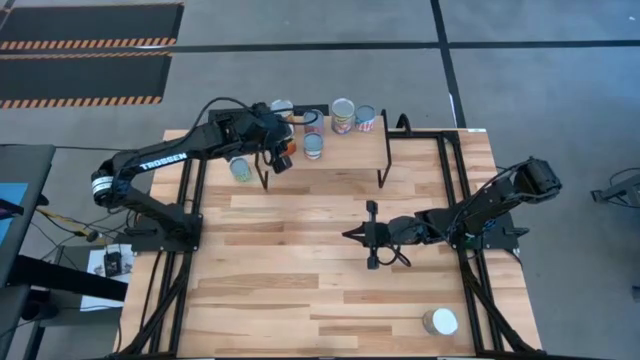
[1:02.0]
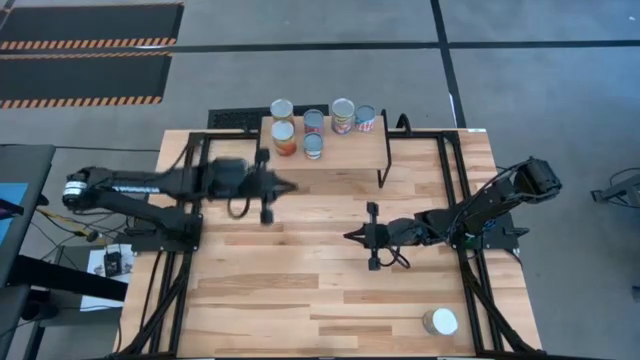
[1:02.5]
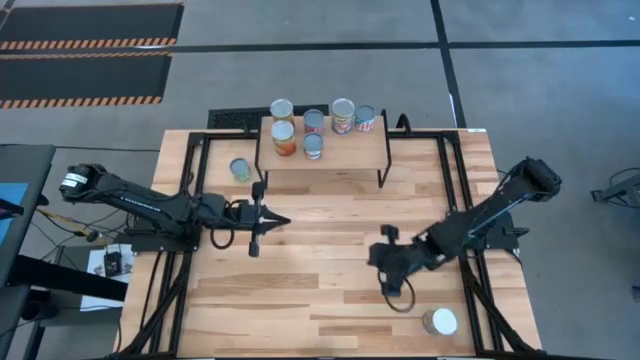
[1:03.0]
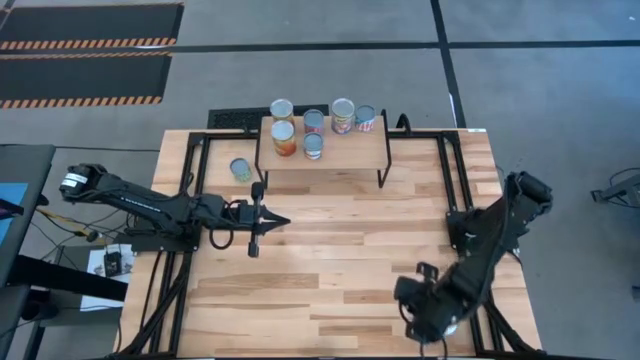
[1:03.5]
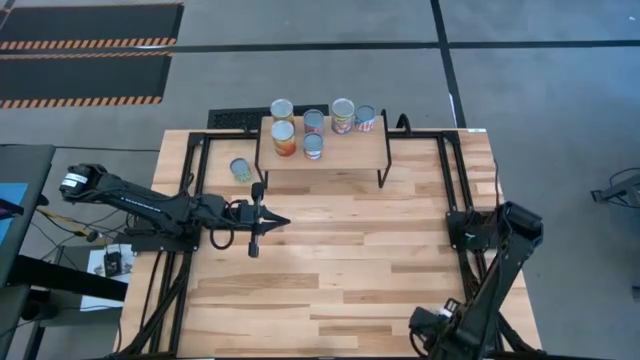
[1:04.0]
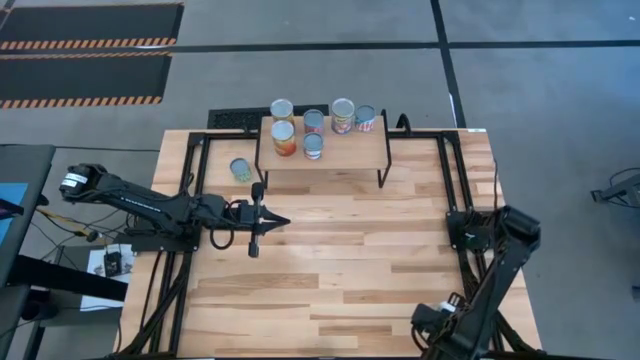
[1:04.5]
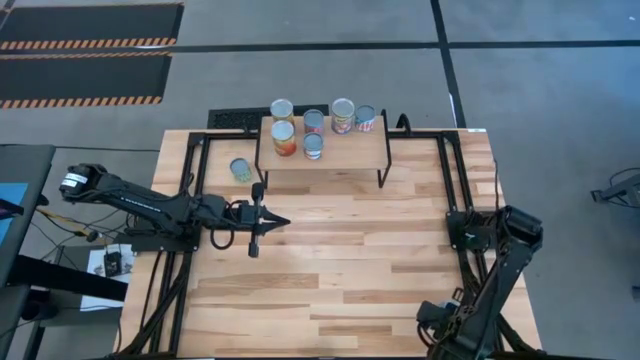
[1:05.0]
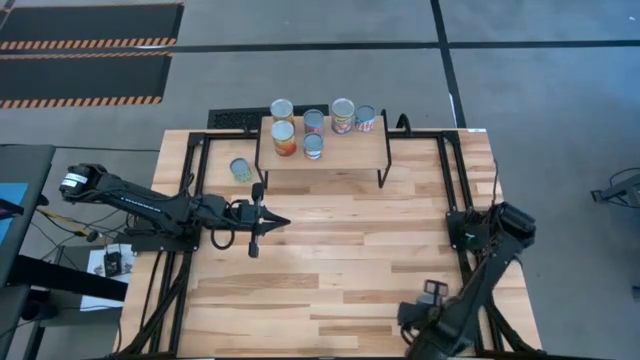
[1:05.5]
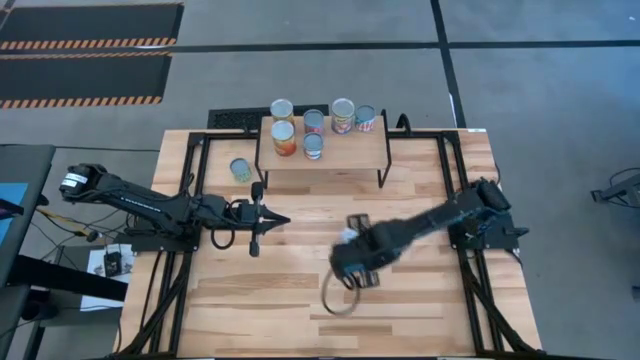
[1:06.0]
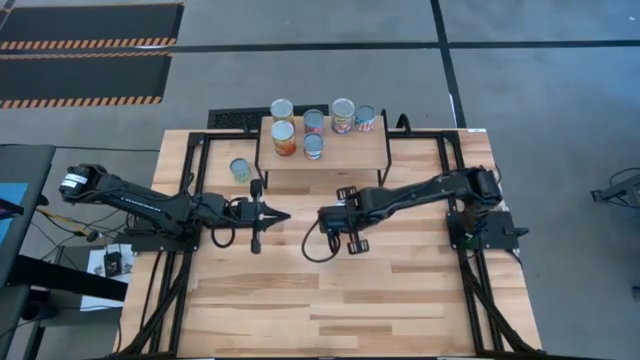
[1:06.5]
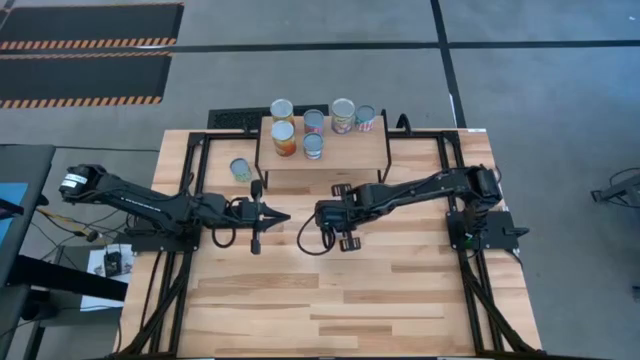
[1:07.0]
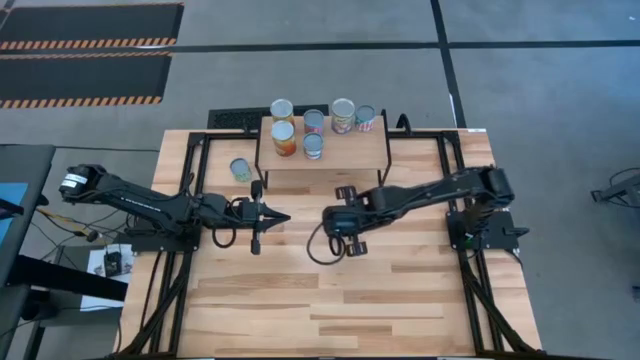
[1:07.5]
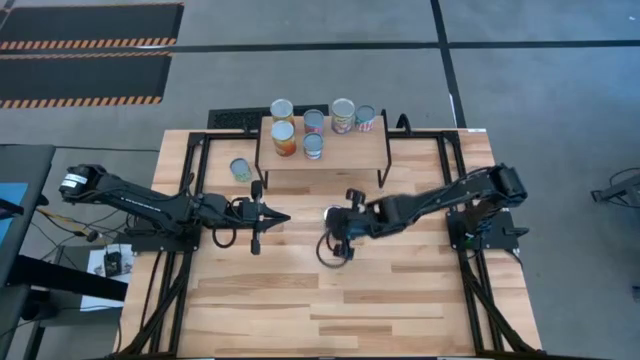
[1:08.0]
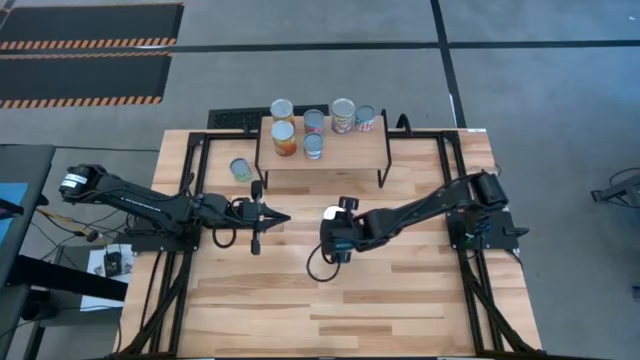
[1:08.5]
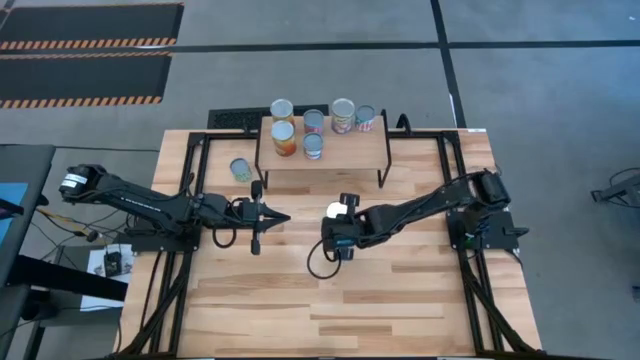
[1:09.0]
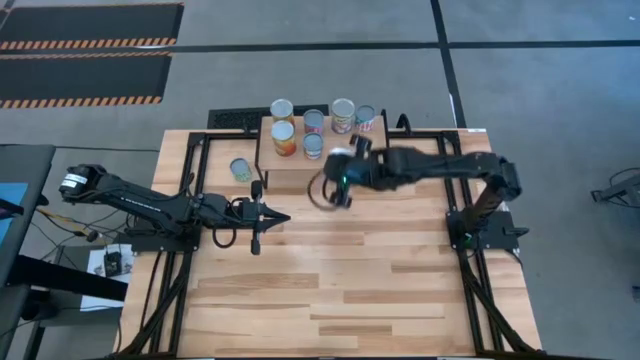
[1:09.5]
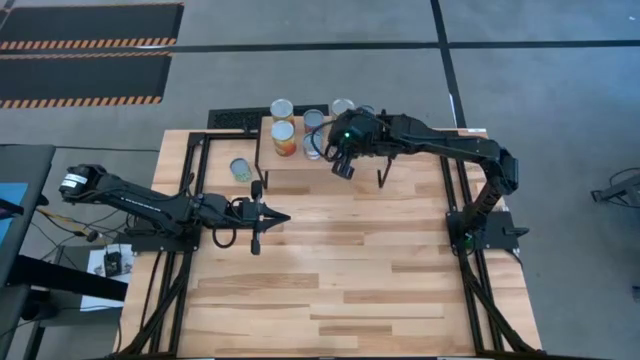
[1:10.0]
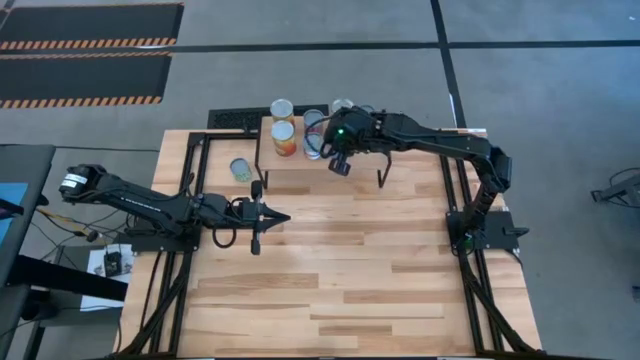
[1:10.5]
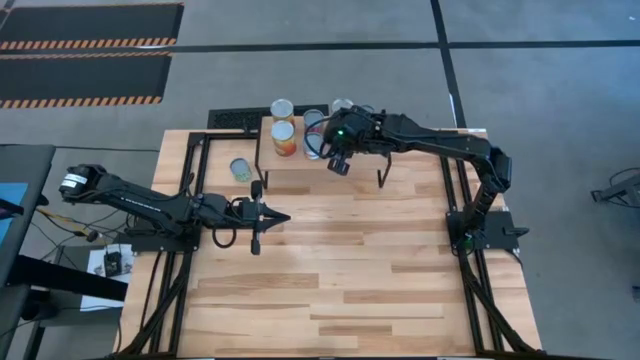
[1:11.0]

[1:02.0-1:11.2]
Task: Pick and place cans onto a shelf
Put the canned peaches on the shelf

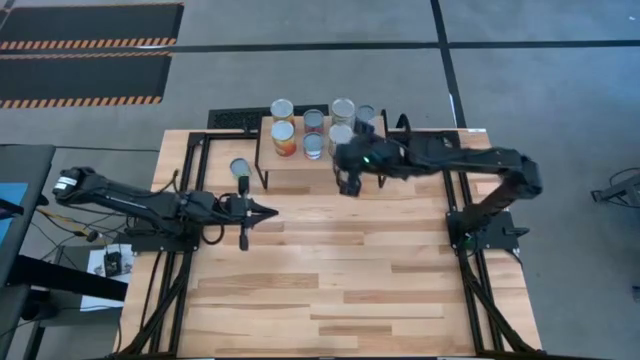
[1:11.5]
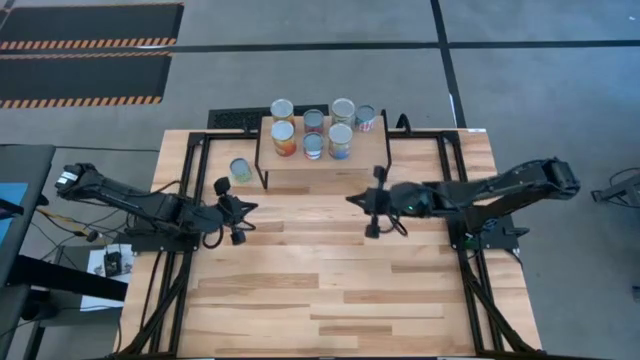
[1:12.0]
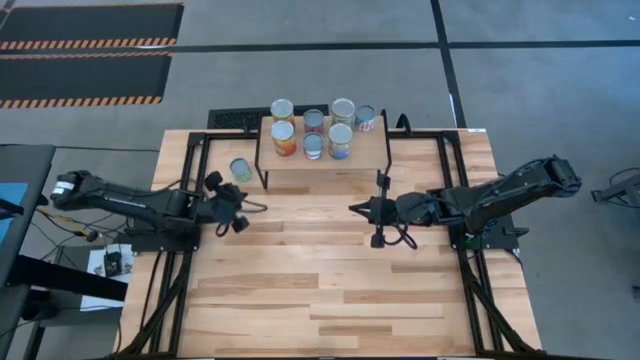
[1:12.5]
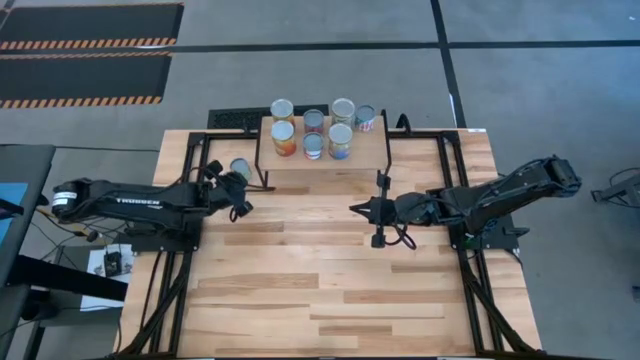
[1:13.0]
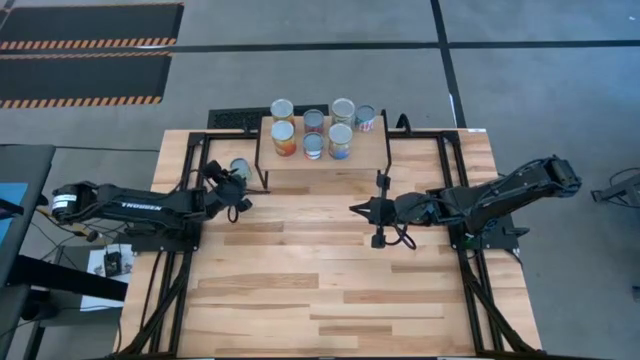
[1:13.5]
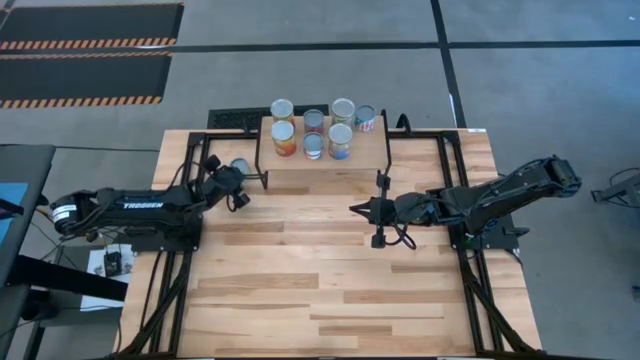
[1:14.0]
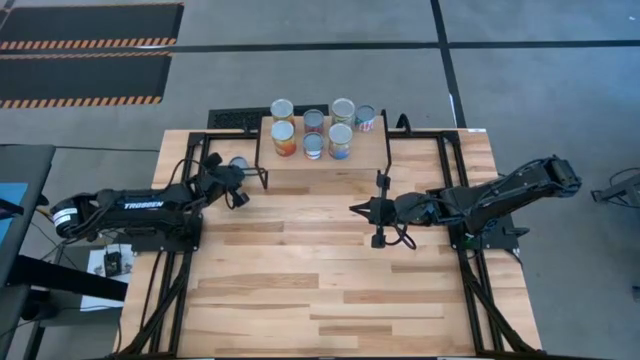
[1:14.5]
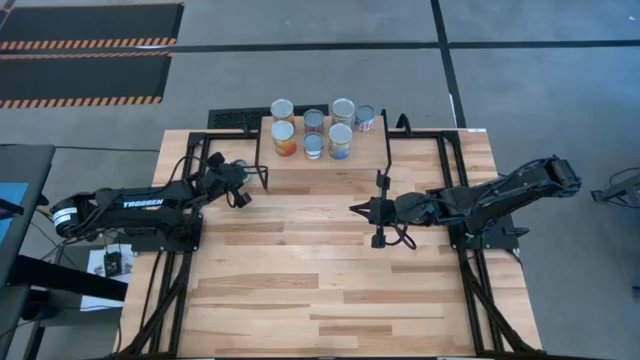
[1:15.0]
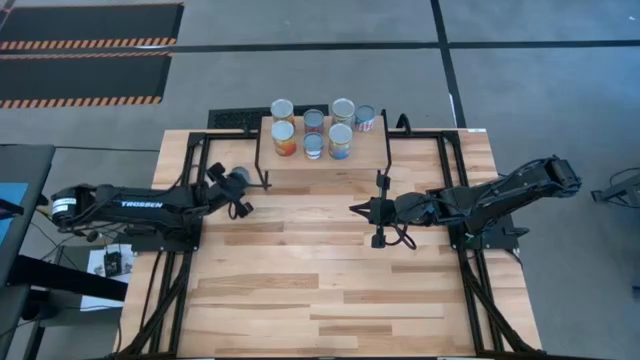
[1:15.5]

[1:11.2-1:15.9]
Put the canned green peas on the shelf

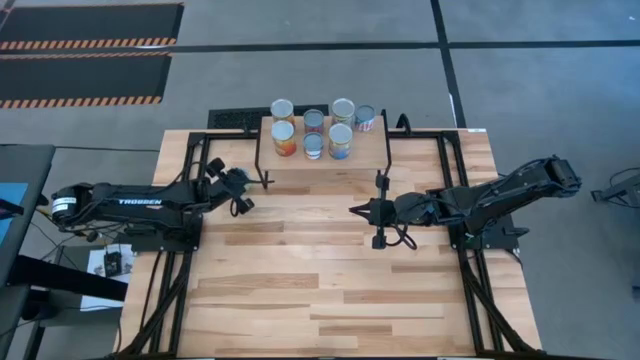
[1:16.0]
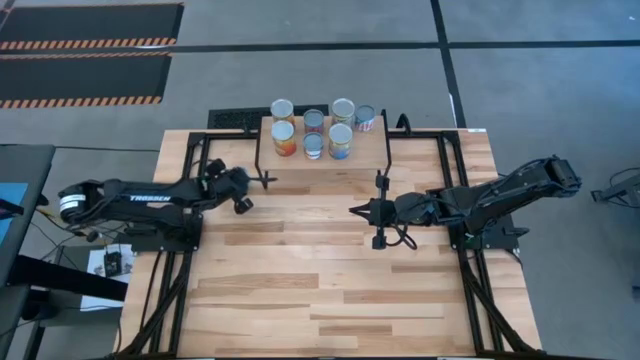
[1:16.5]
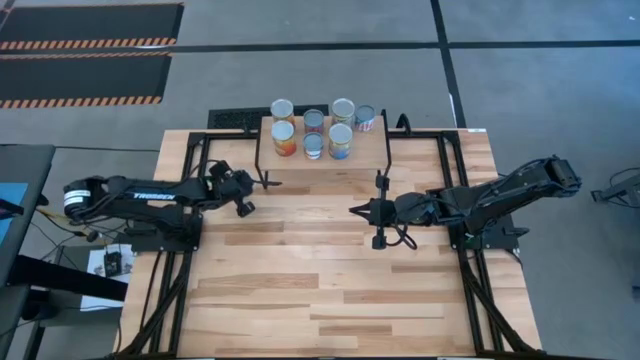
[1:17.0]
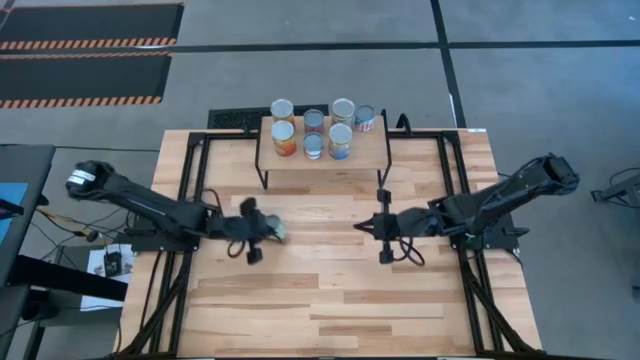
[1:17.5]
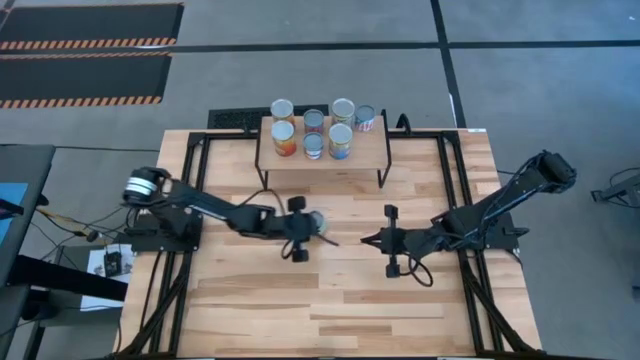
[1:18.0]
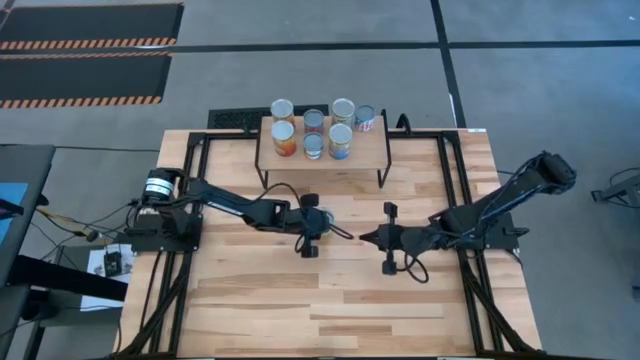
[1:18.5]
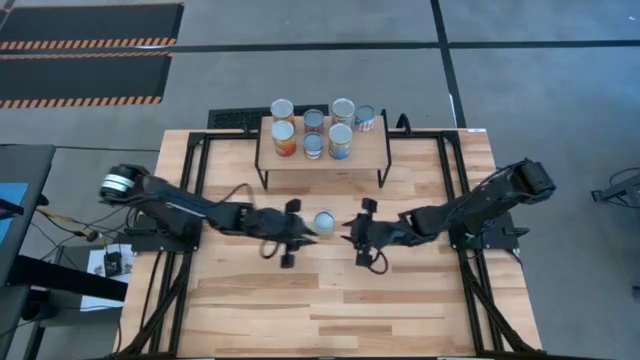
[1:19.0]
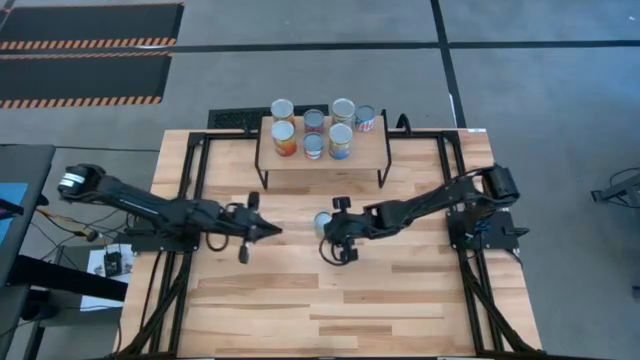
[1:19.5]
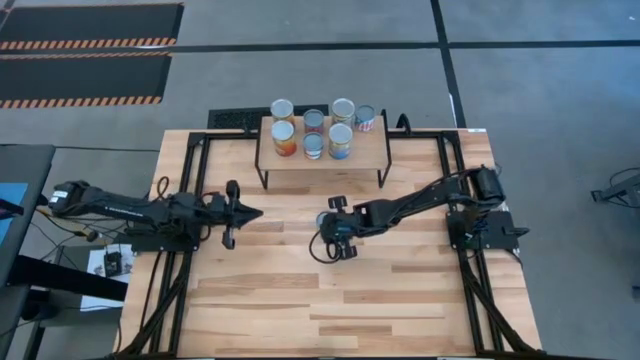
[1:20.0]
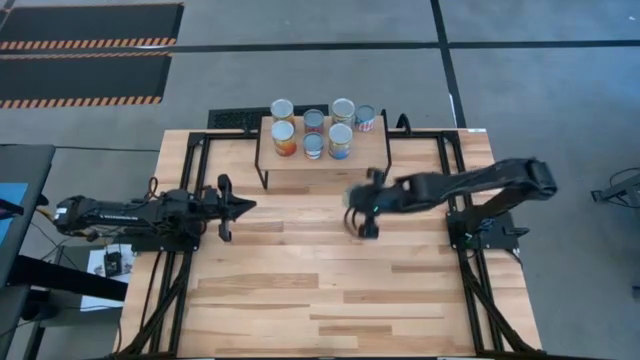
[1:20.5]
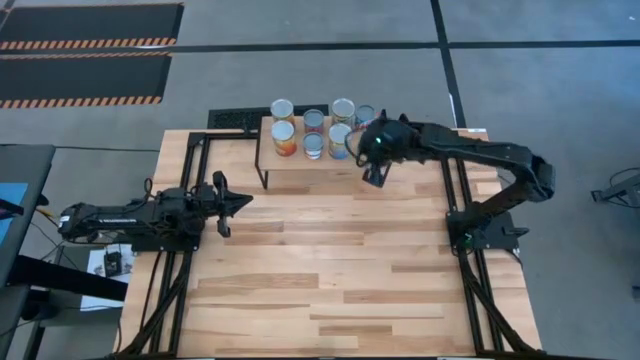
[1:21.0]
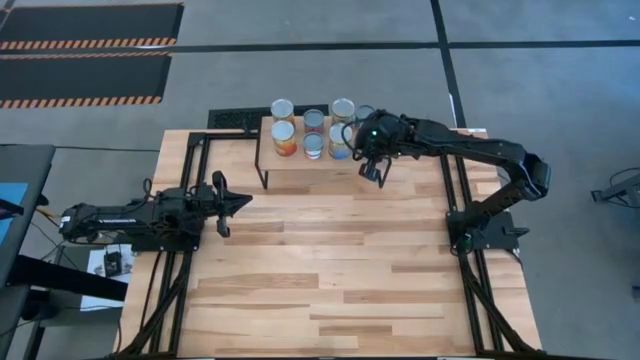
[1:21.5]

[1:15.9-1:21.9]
Put the canned green peas on the shelf

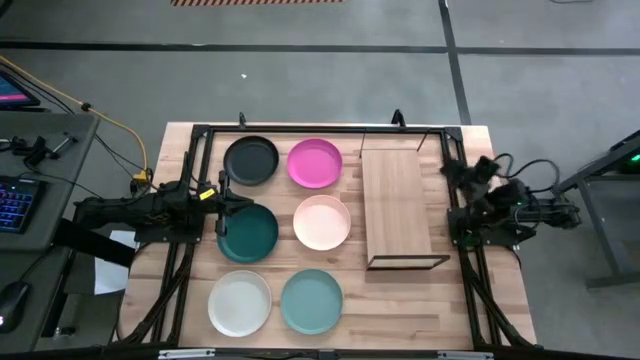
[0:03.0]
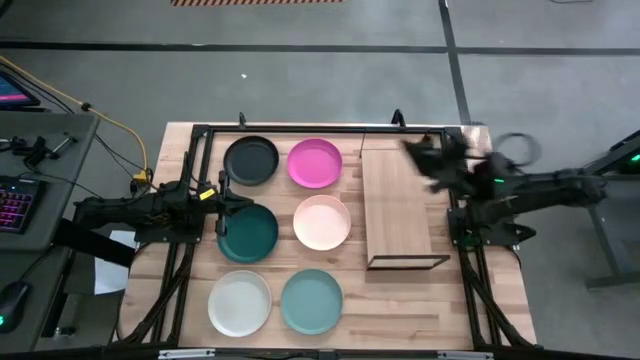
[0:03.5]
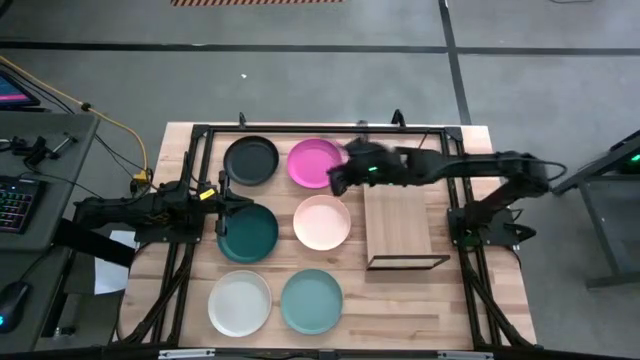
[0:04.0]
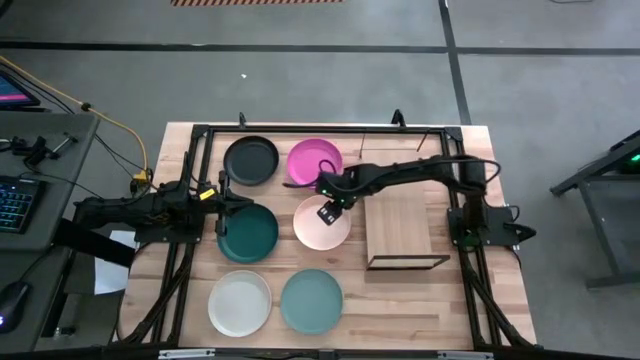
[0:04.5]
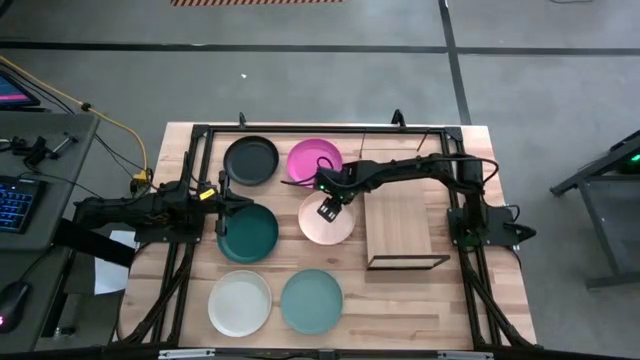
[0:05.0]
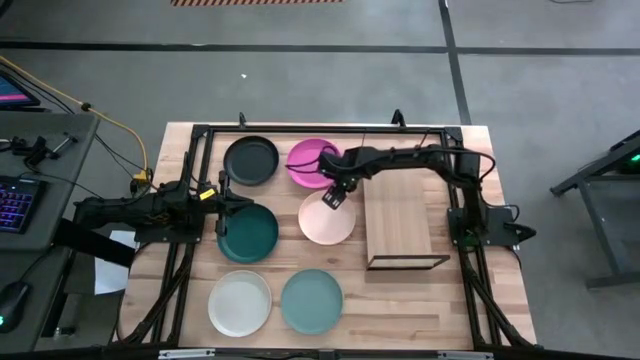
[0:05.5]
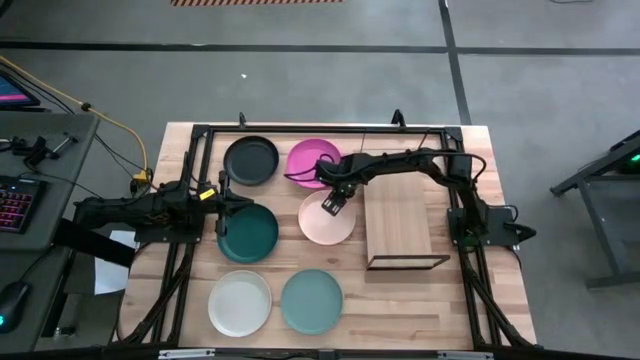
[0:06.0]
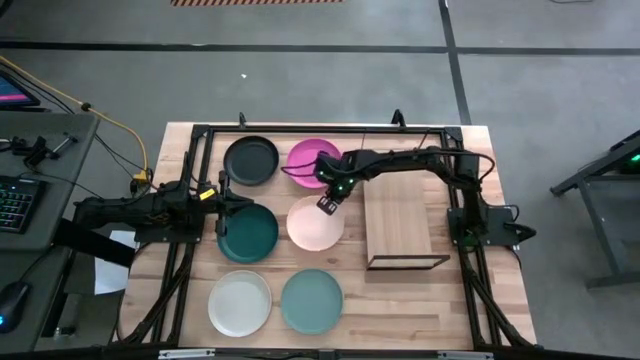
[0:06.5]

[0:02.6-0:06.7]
Task: Place and stack plates onto a shelf
Put the light red plate on the shelf
